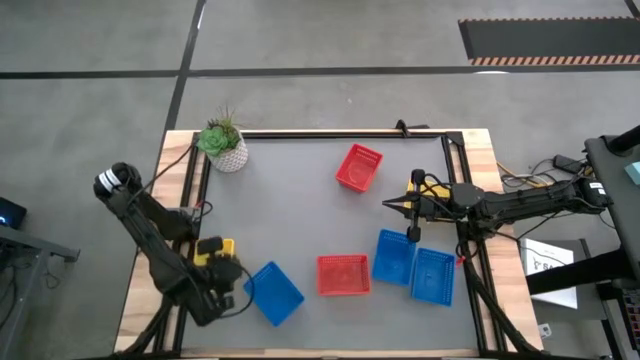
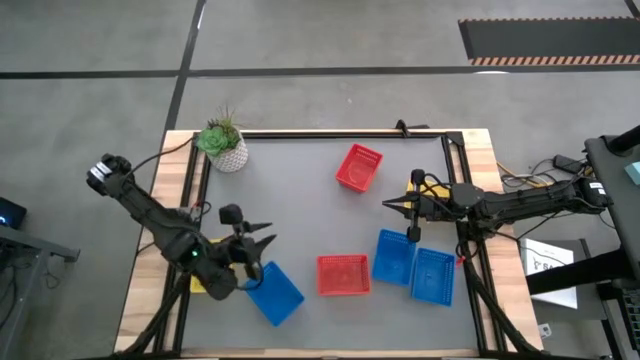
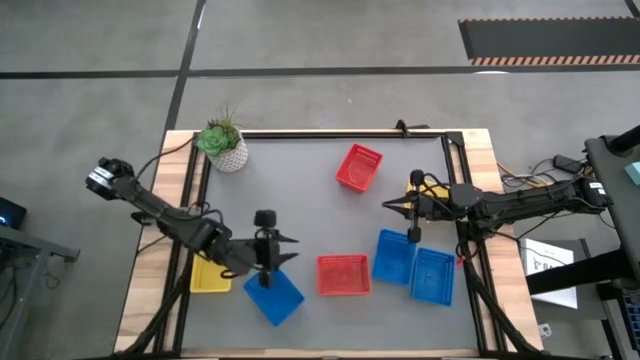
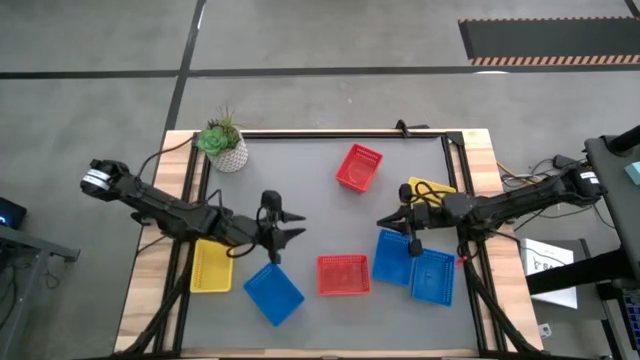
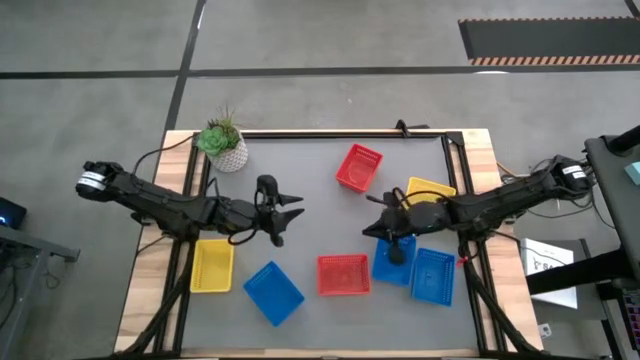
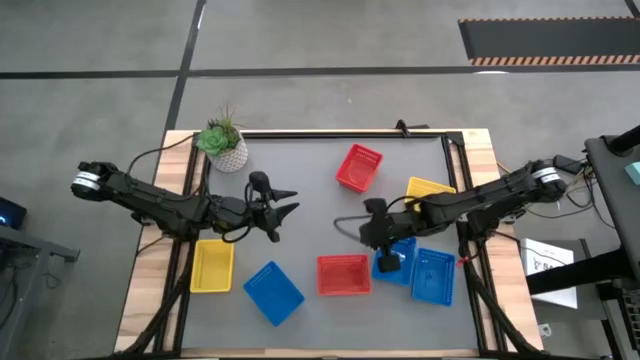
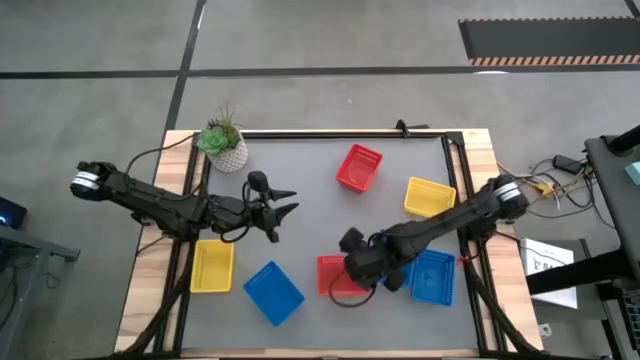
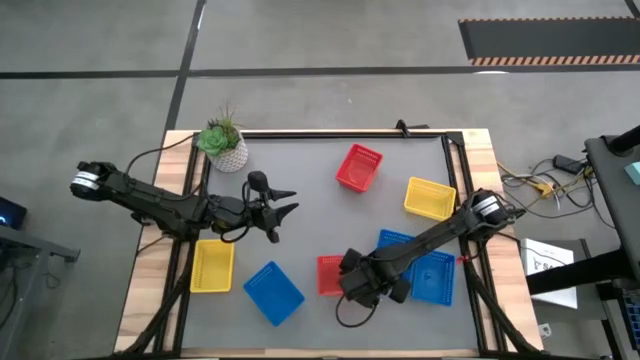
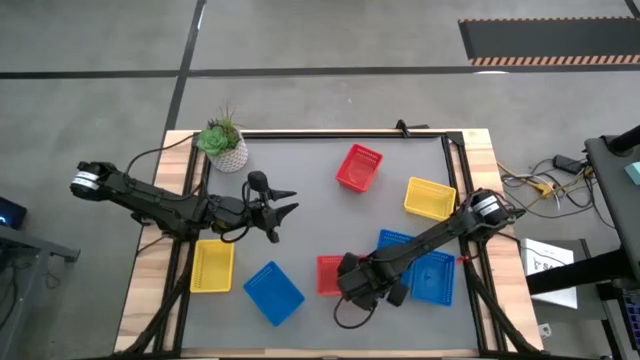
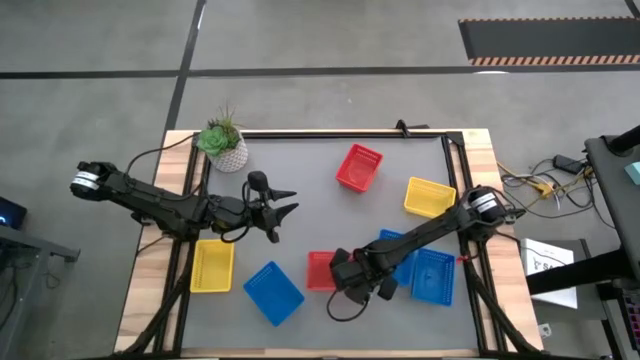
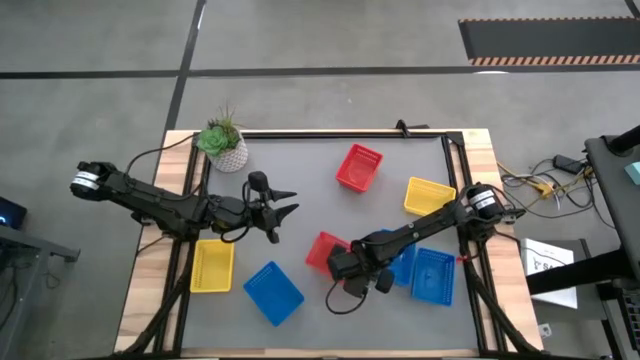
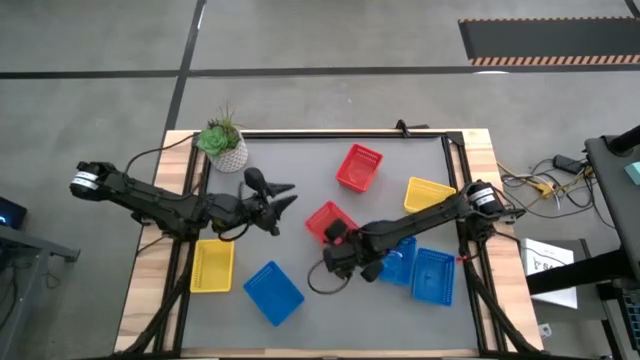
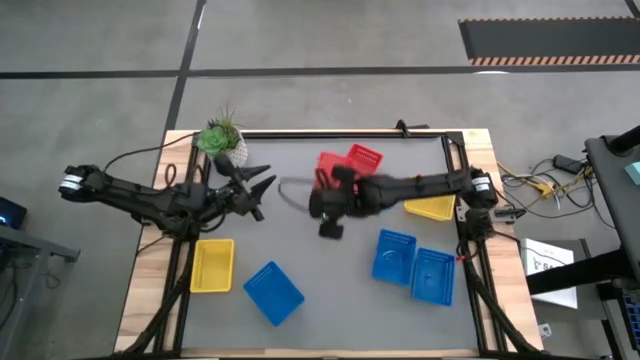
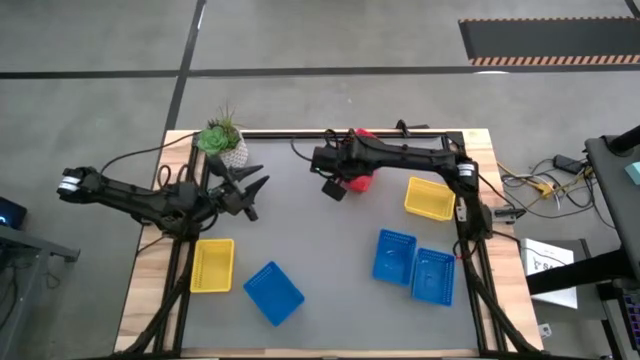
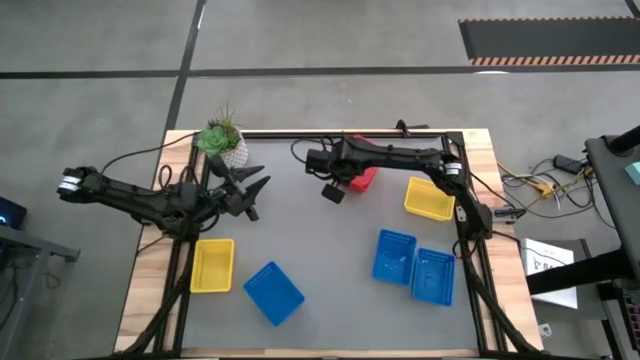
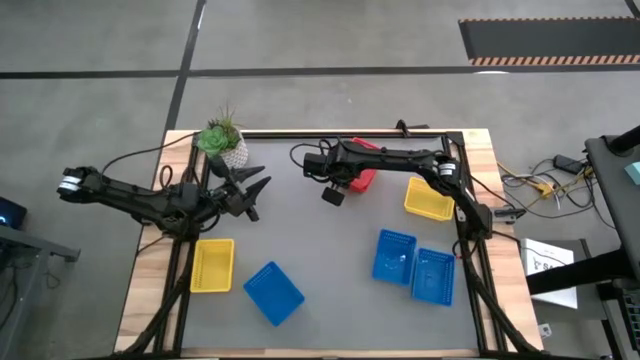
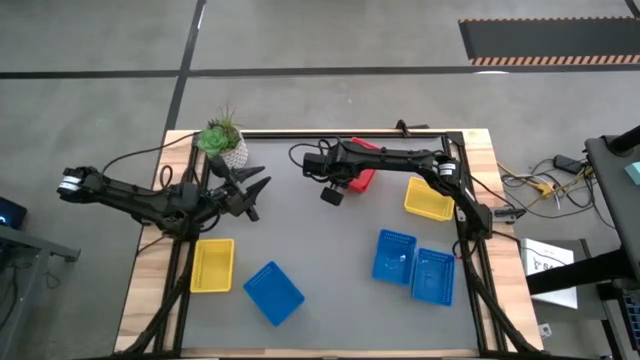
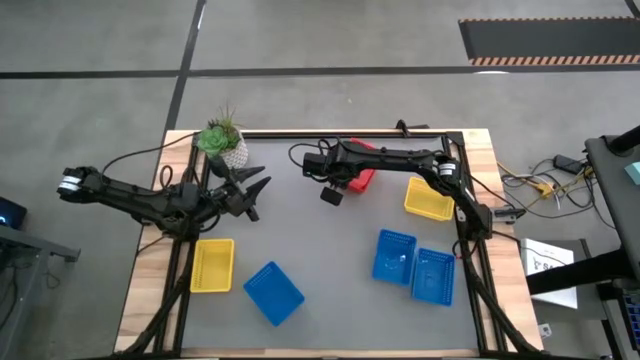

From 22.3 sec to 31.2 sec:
Stack the bottom red bin on the top red bin

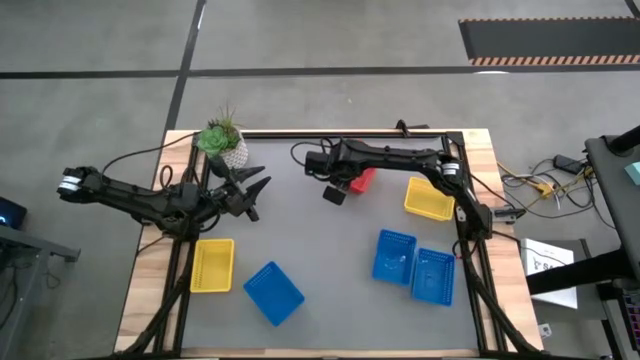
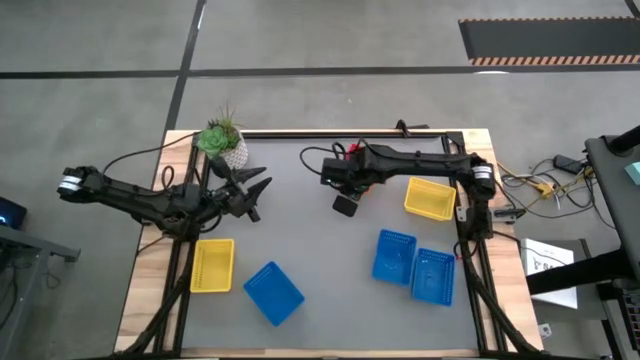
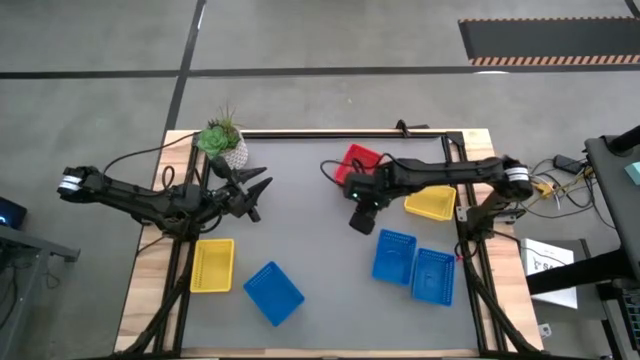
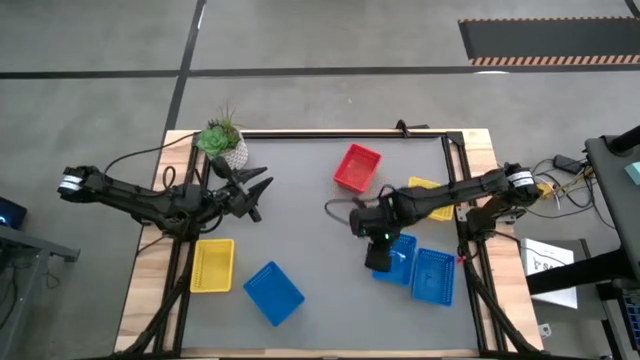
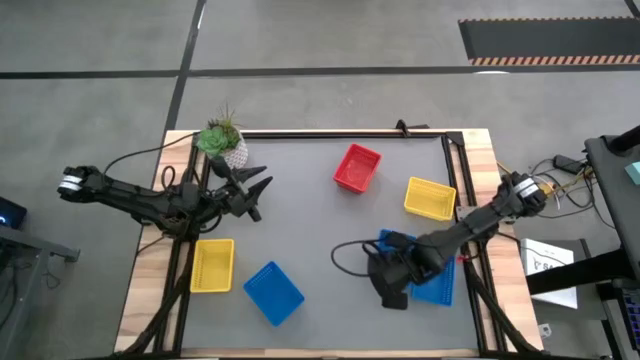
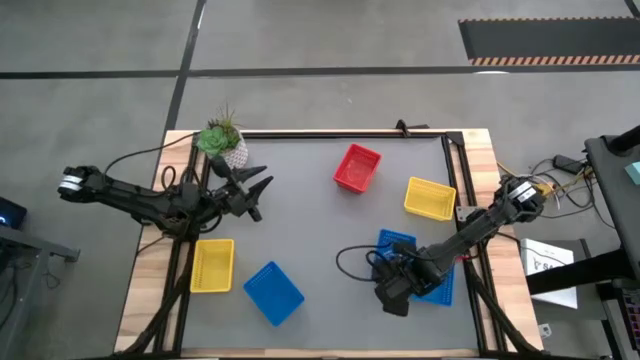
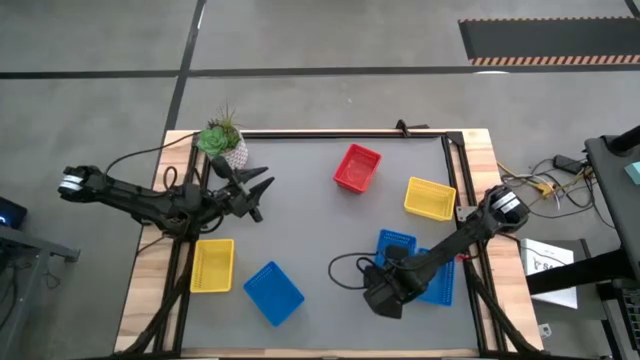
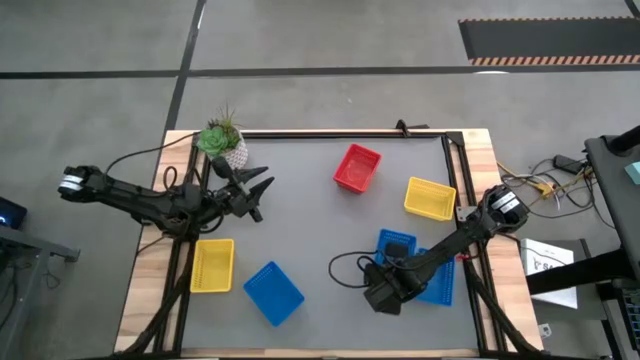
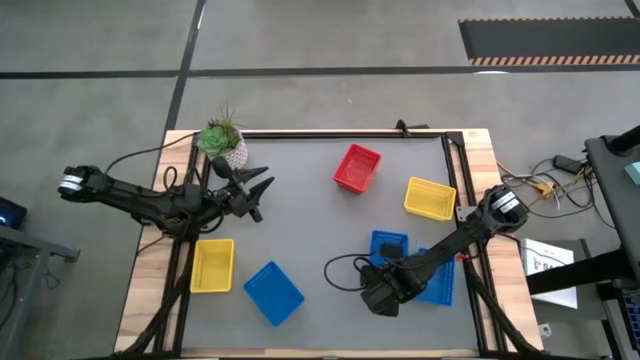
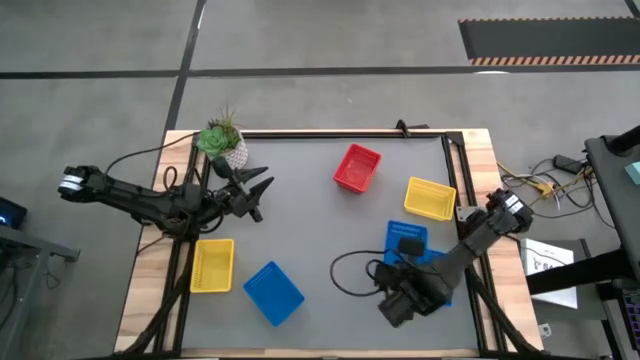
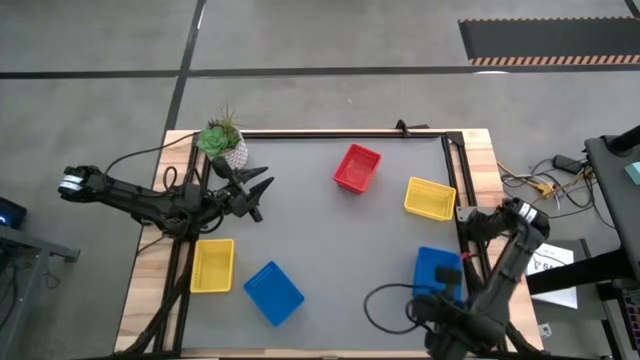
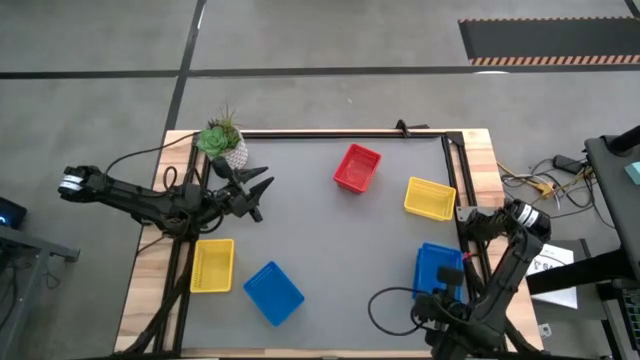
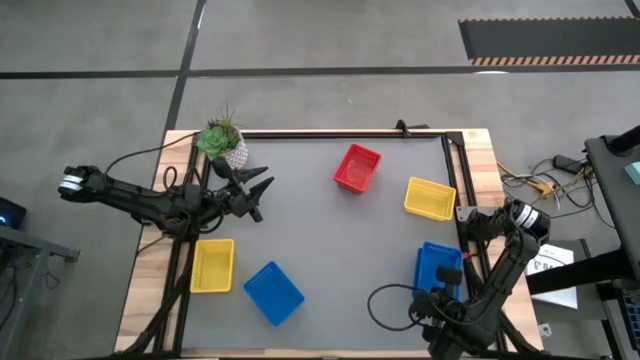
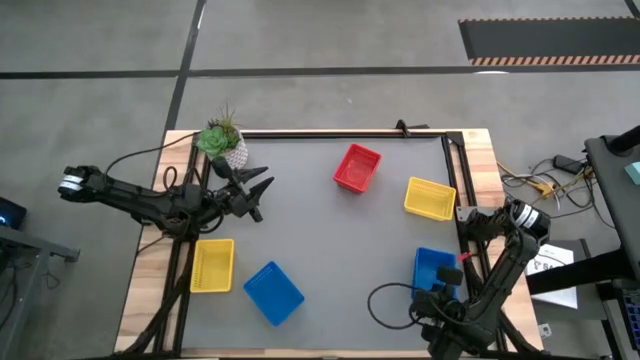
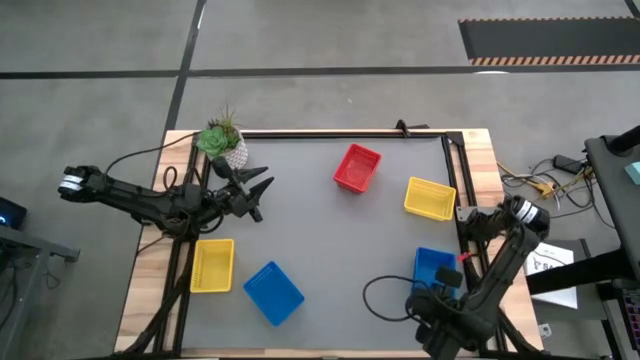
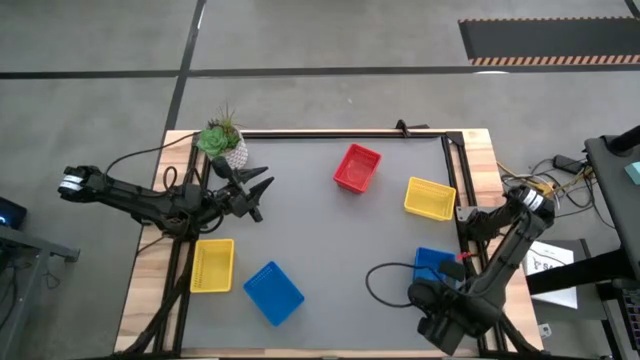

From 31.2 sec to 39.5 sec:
Stack the middle blue bin on the right blue bin
